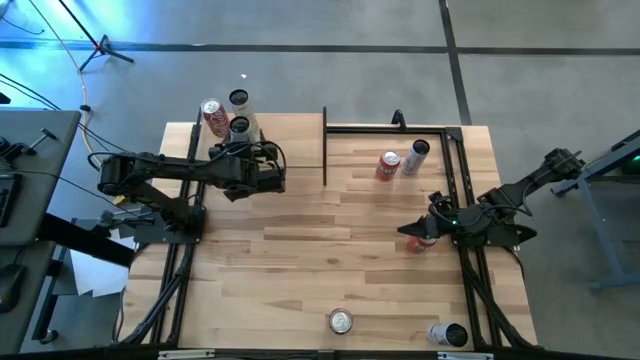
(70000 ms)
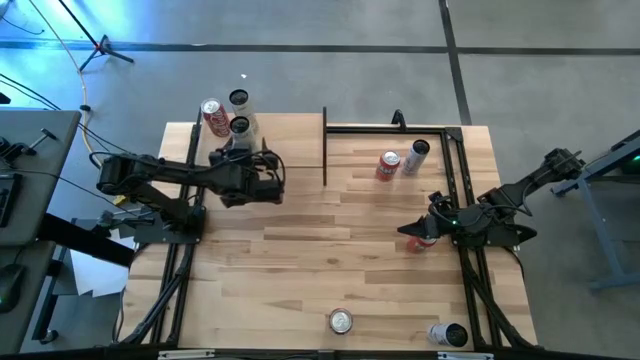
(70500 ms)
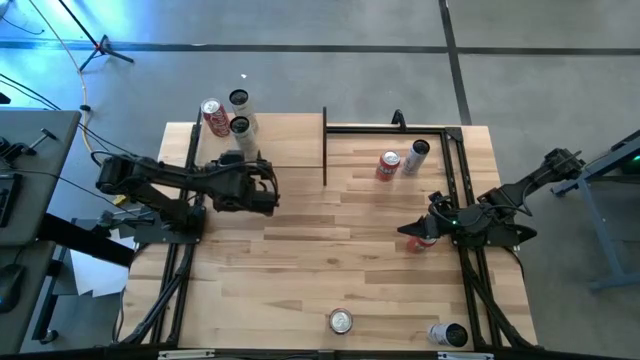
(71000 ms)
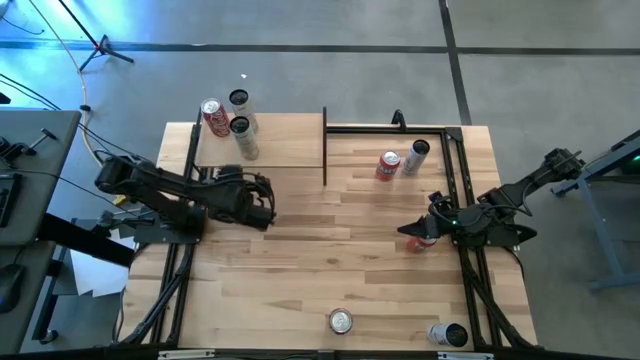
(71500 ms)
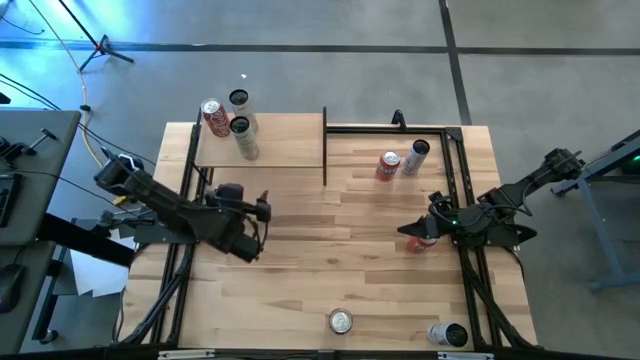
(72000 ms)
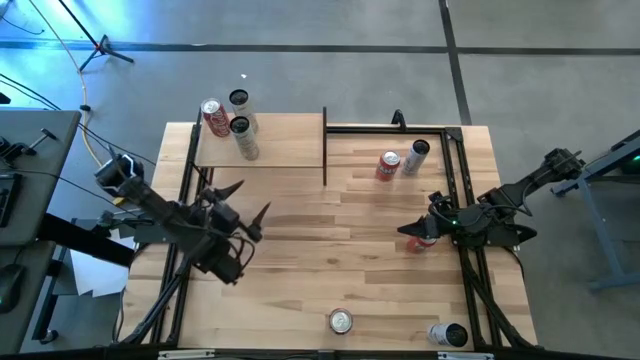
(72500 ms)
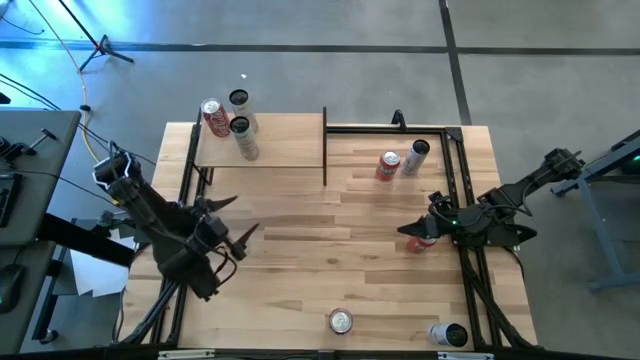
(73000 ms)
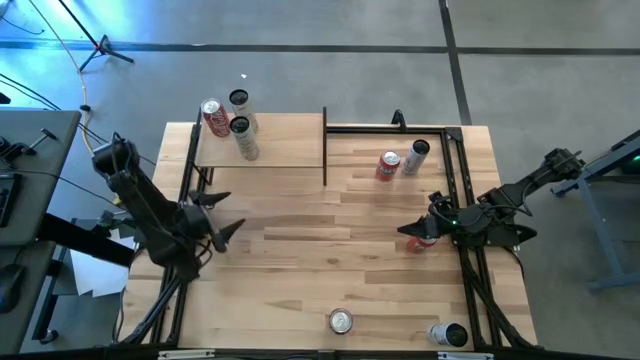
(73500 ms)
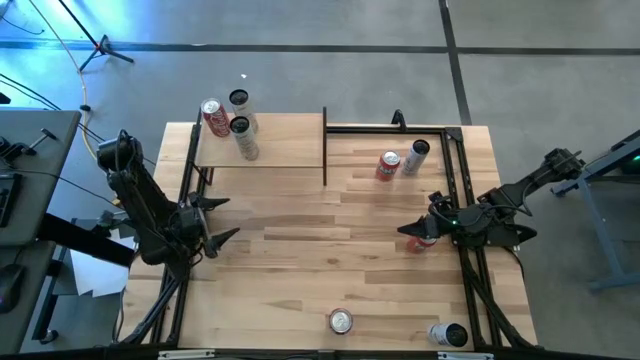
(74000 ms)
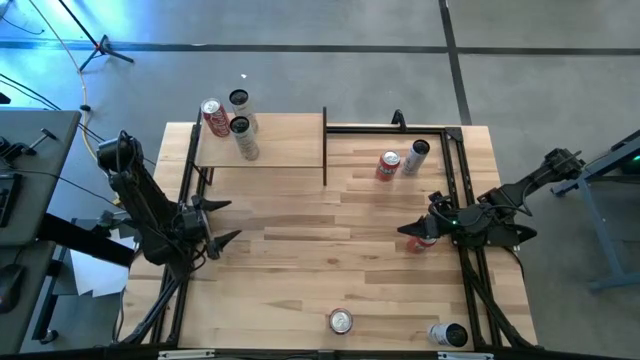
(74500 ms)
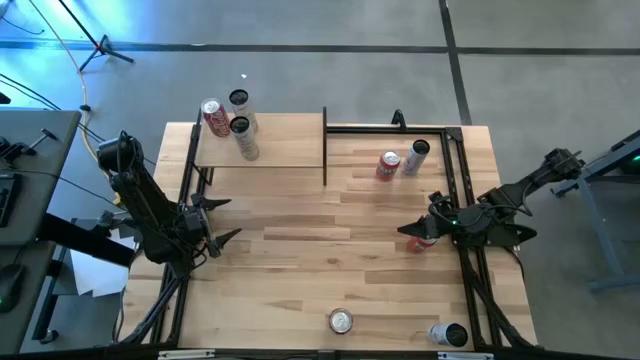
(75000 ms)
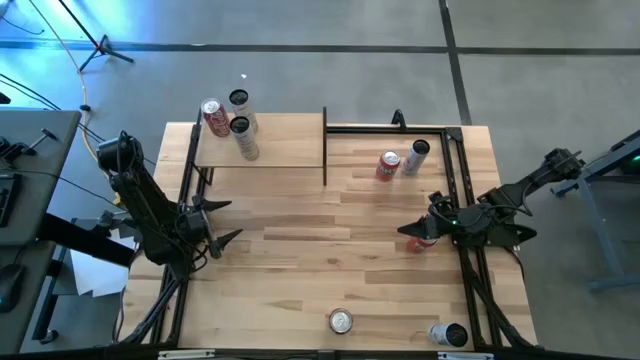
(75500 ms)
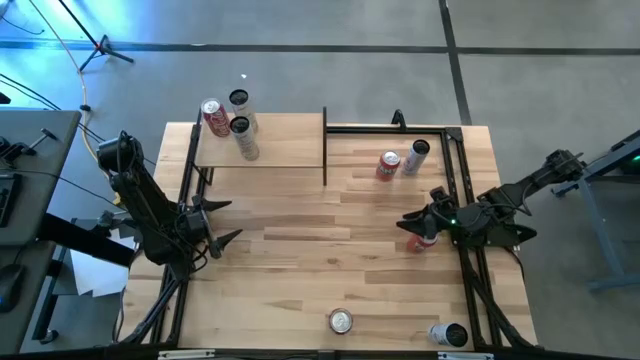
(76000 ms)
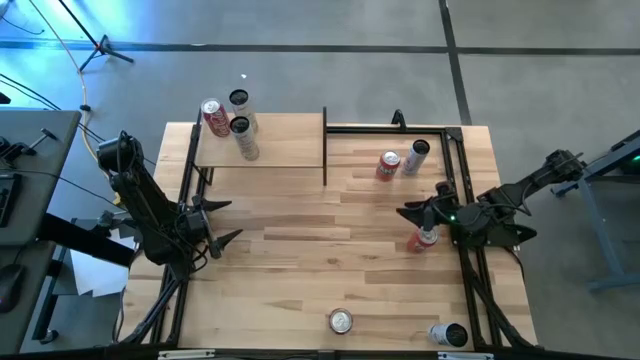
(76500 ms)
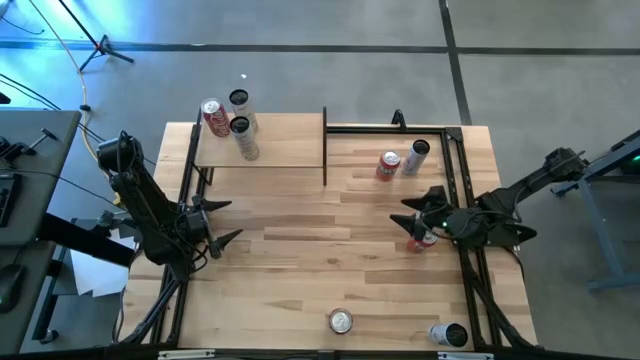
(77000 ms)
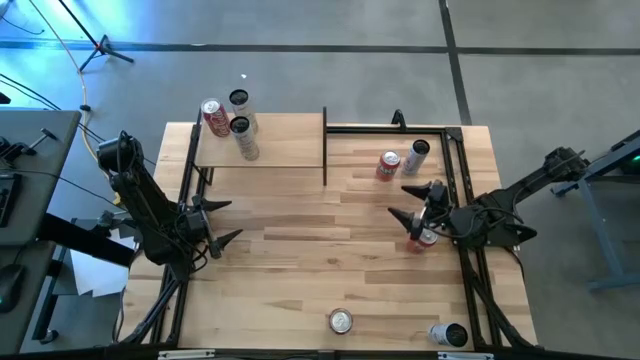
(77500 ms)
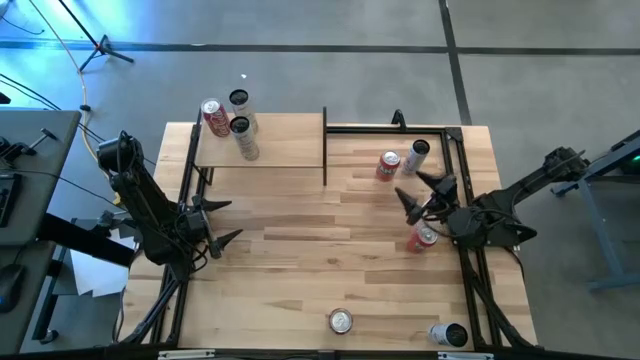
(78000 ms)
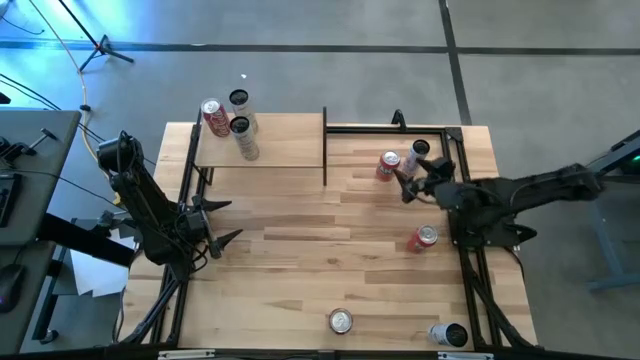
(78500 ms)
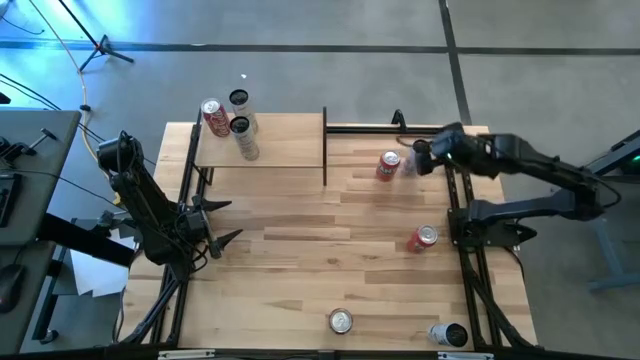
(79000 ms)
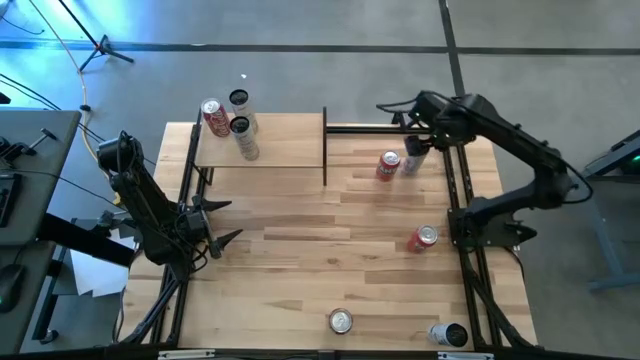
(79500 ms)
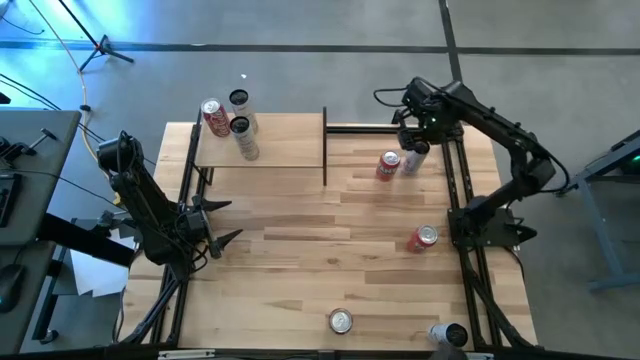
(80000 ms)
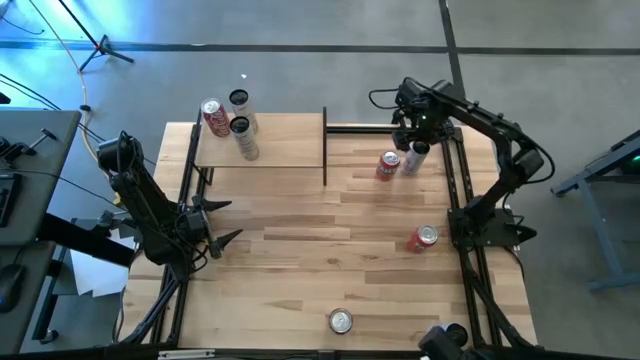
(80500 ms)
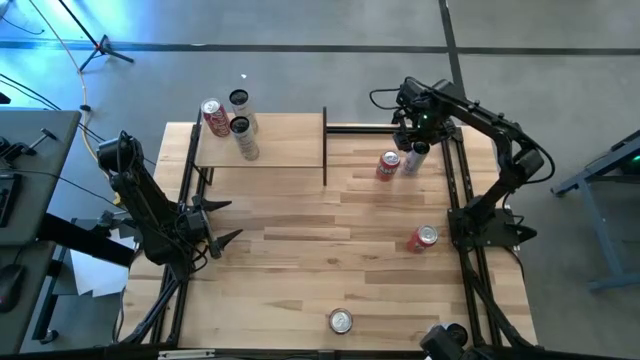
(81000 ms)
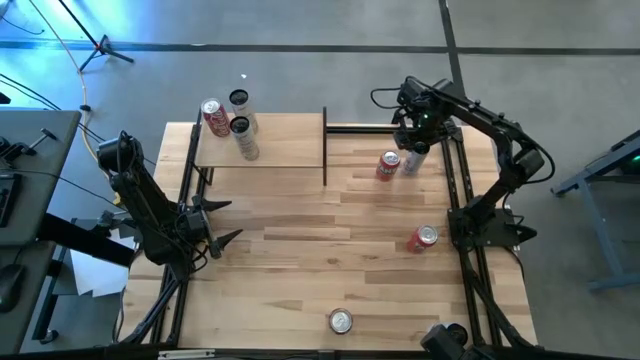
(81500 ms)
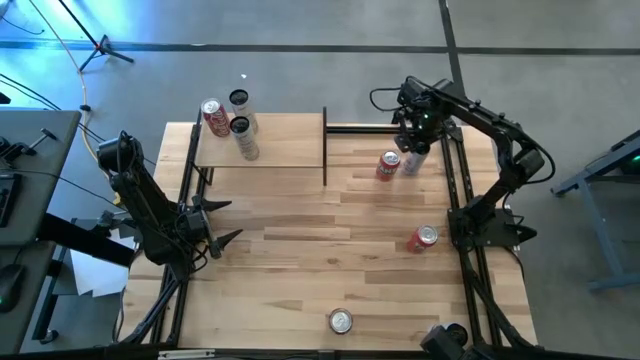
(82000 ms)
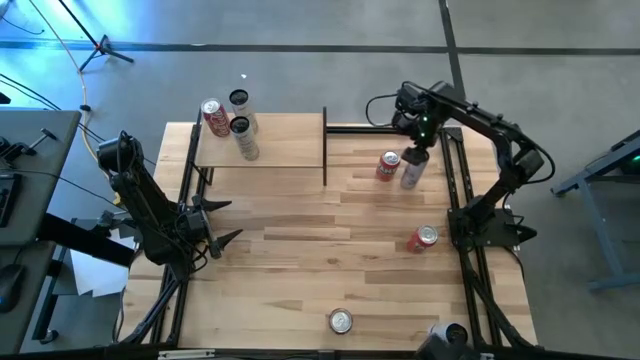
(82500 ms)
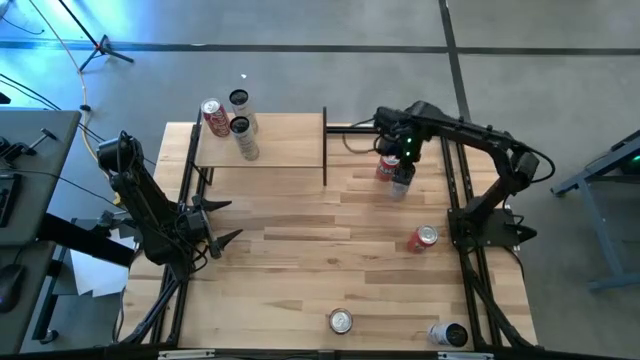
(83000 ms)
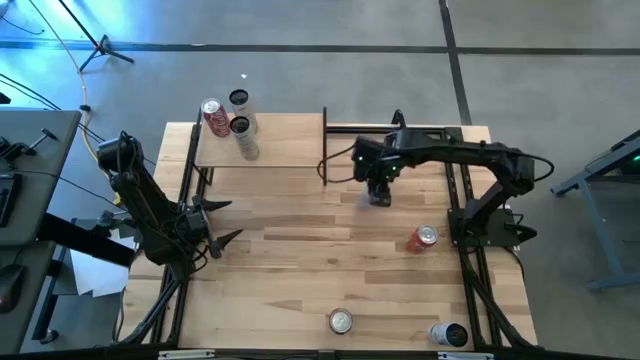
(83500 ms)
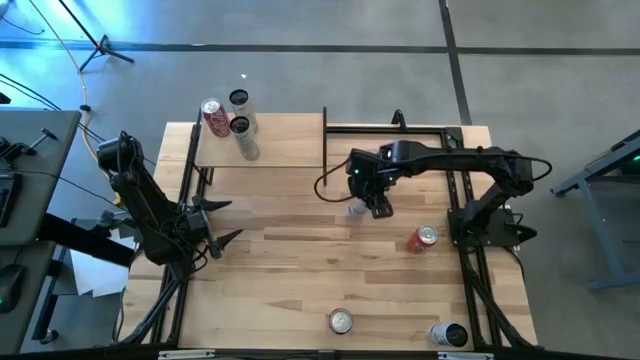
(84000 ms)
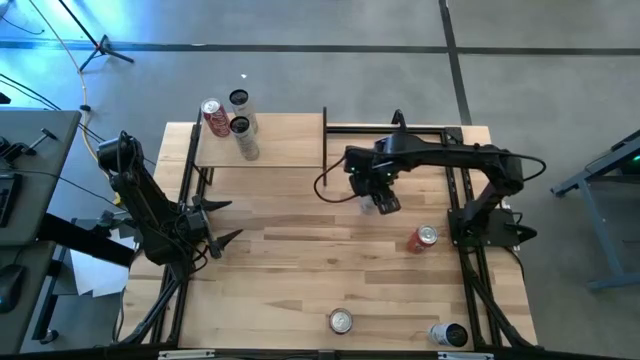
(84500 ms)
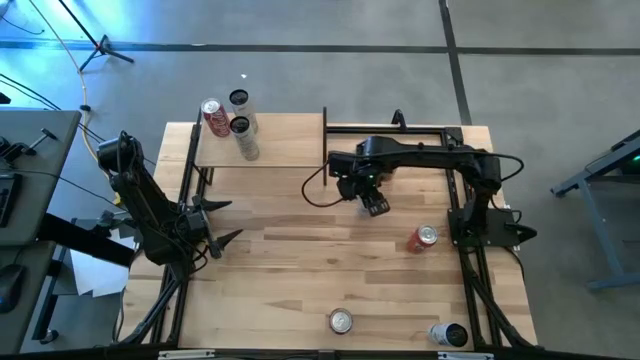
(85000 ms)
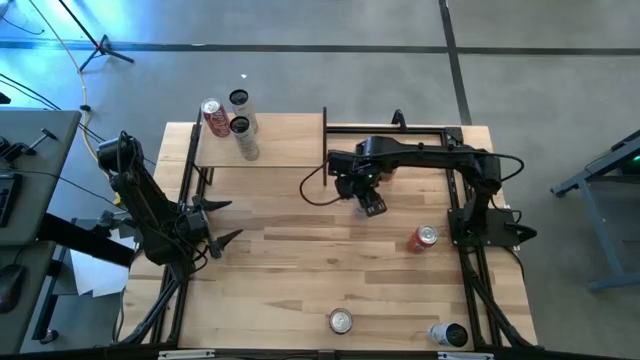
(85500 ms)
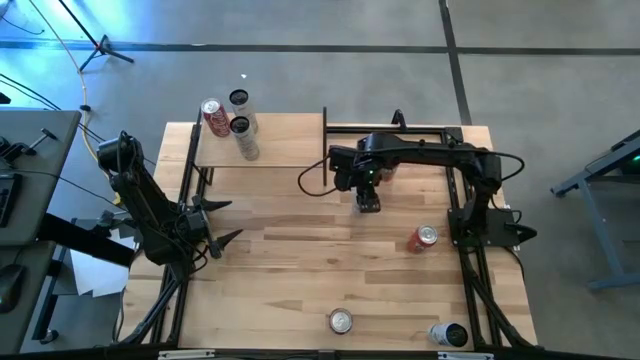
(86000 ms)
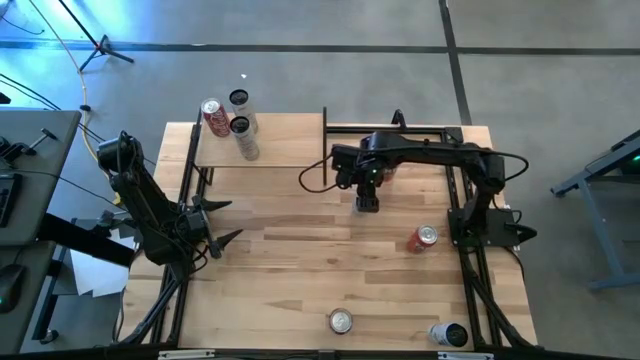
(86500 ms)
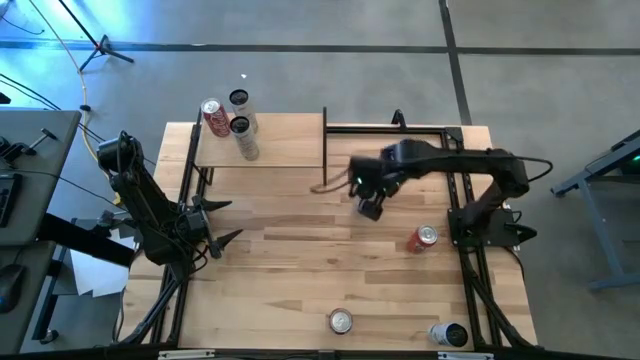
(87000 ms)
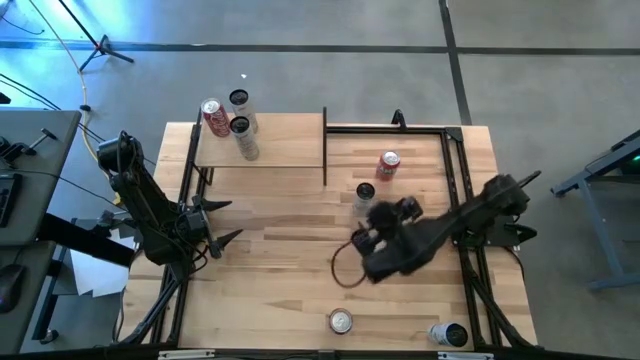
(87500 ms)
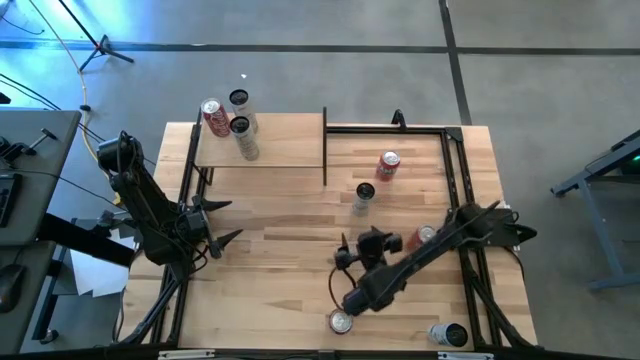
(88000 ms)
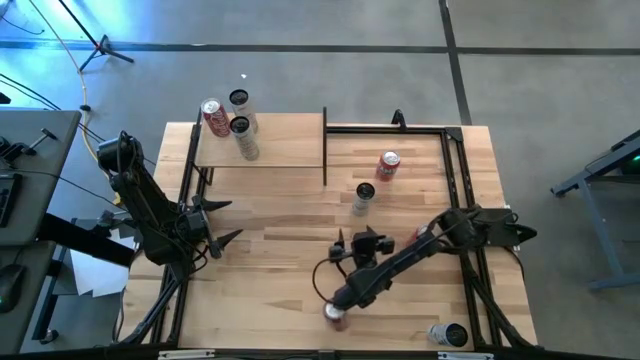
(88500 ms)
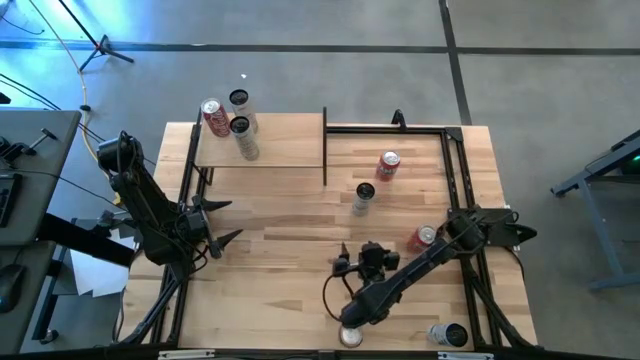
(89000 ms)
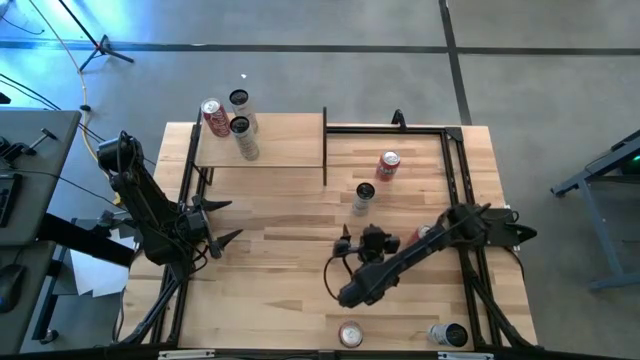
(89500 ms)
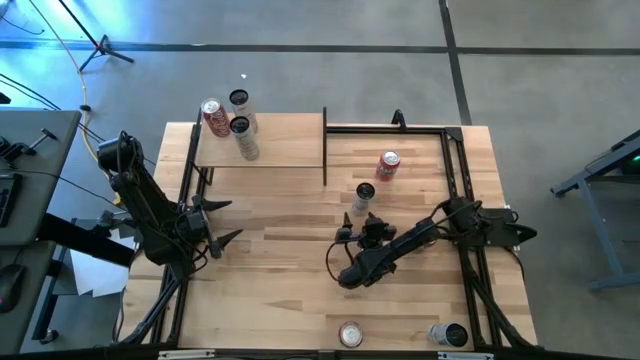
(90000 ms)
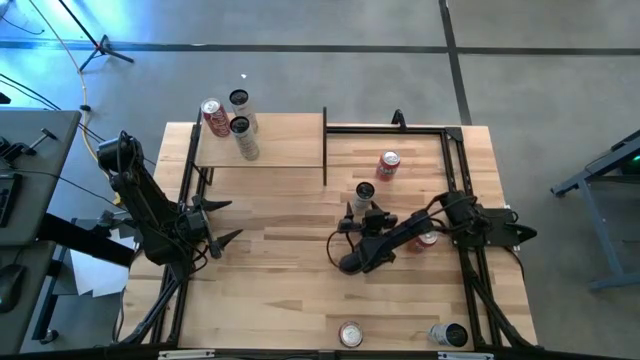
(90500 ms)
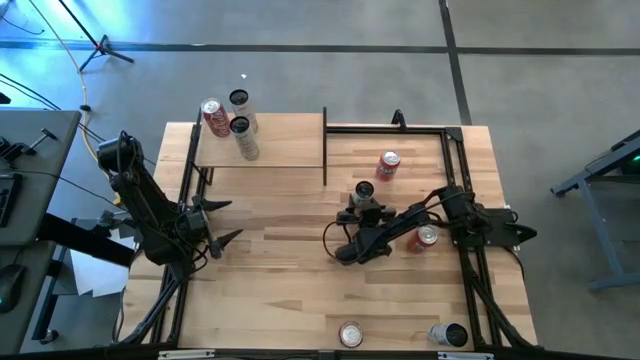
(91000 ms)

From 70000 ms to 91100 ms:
Task: Place canned beverage on shelf
Put the top blue soda can on the shelf
